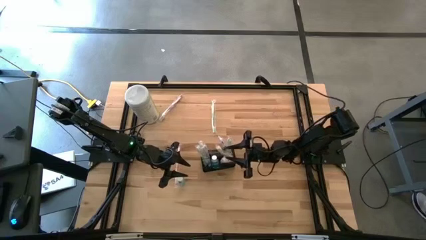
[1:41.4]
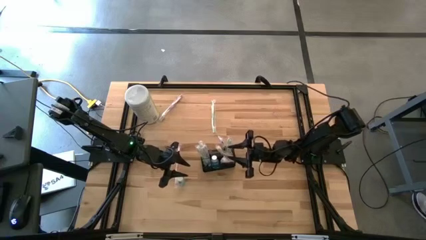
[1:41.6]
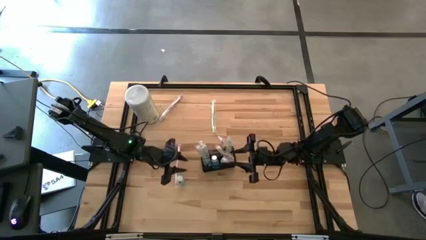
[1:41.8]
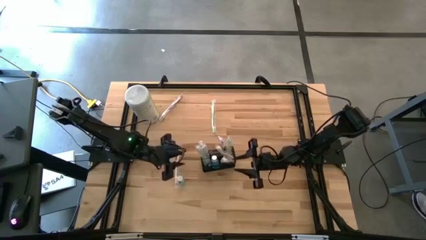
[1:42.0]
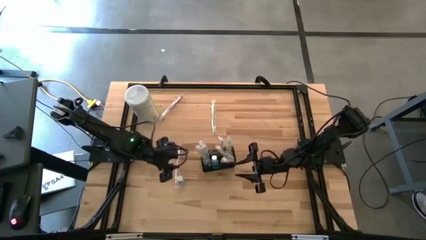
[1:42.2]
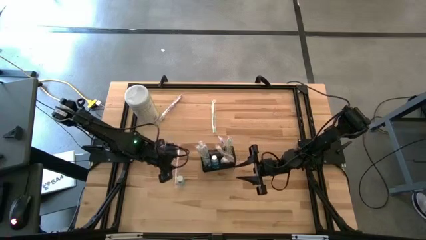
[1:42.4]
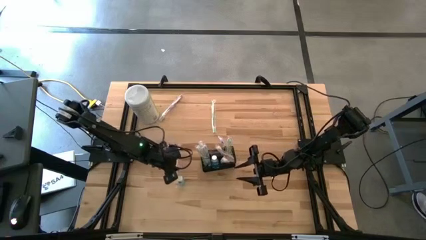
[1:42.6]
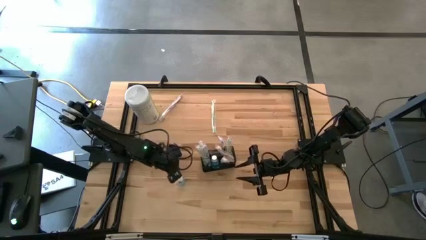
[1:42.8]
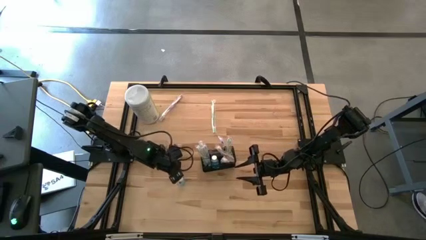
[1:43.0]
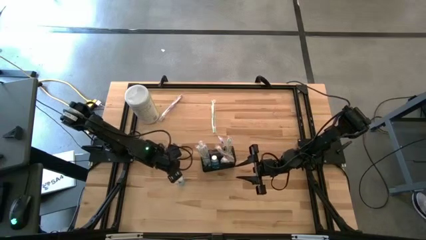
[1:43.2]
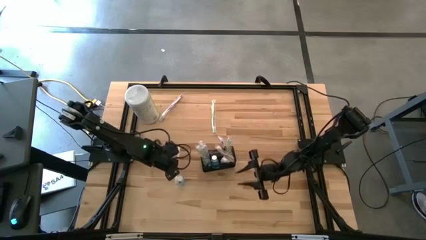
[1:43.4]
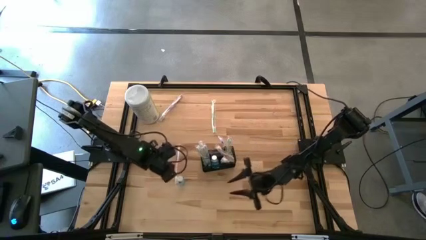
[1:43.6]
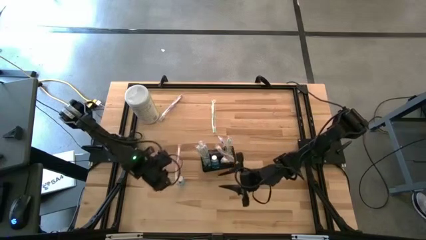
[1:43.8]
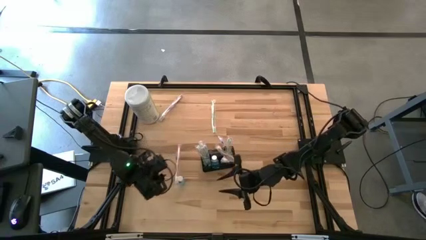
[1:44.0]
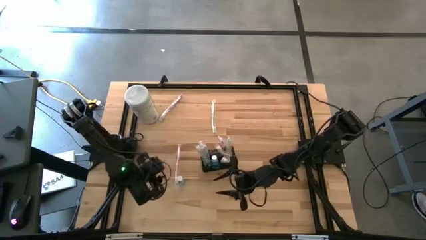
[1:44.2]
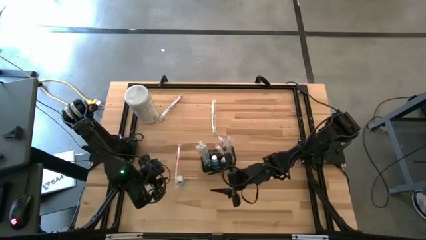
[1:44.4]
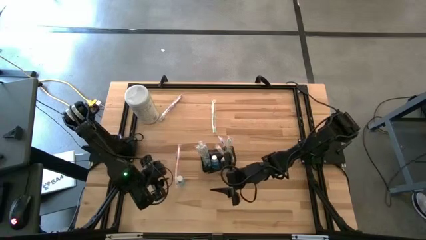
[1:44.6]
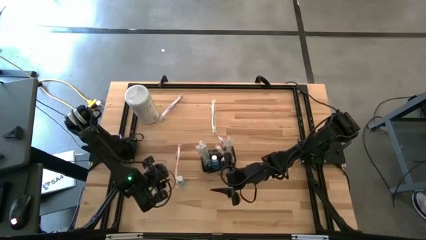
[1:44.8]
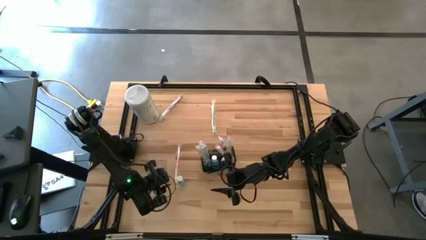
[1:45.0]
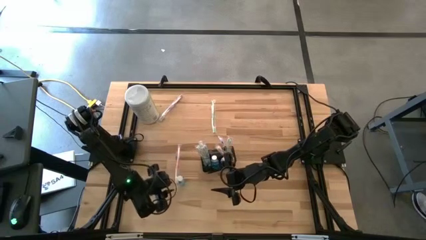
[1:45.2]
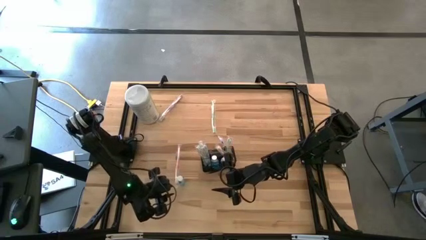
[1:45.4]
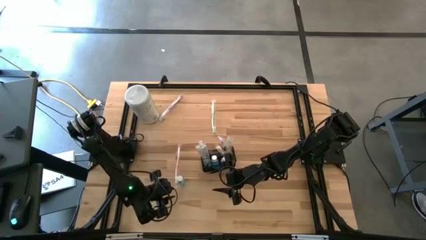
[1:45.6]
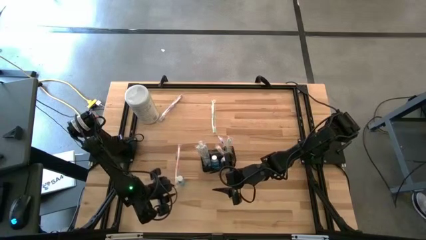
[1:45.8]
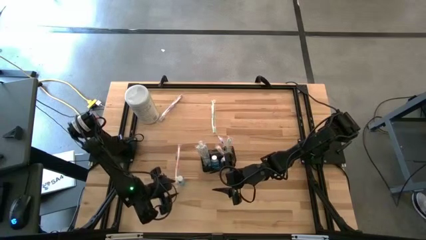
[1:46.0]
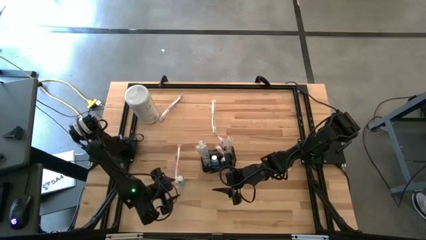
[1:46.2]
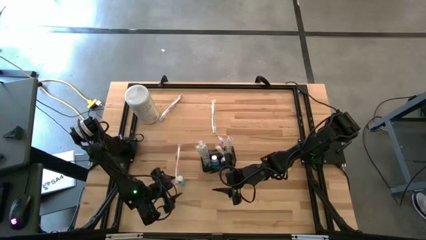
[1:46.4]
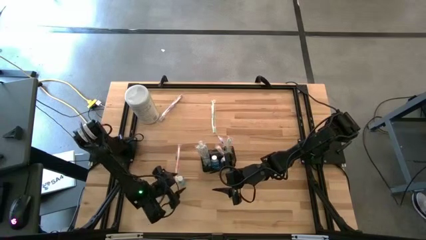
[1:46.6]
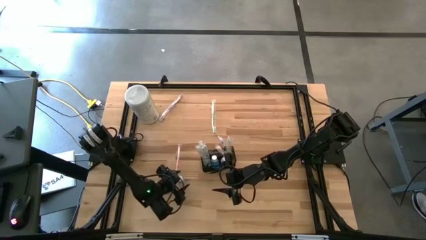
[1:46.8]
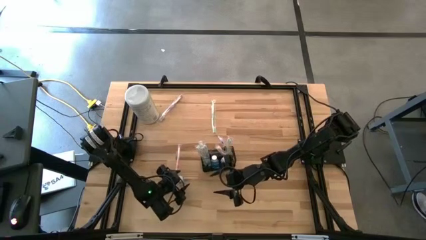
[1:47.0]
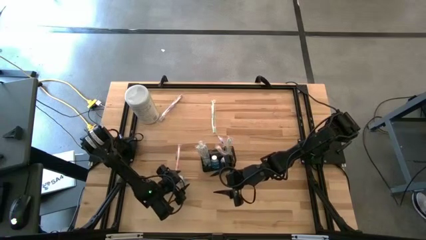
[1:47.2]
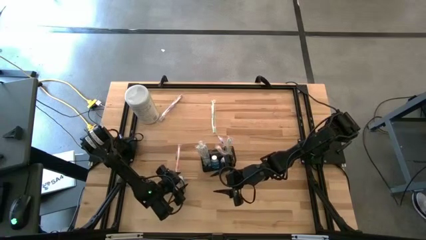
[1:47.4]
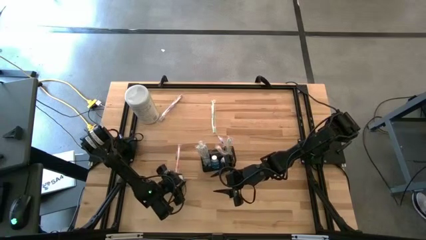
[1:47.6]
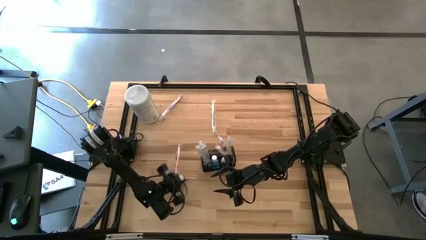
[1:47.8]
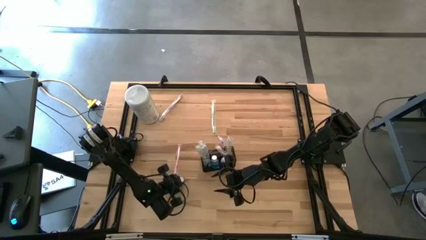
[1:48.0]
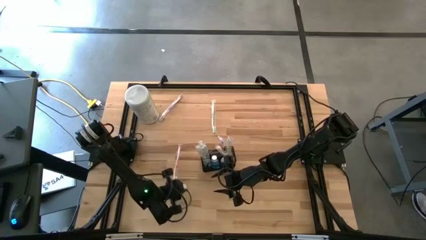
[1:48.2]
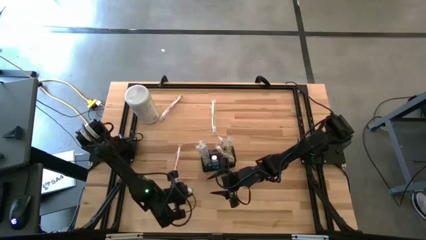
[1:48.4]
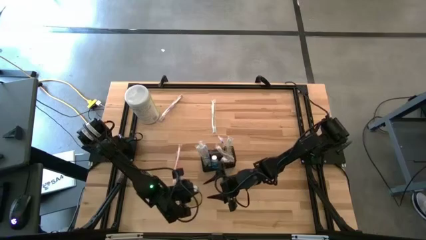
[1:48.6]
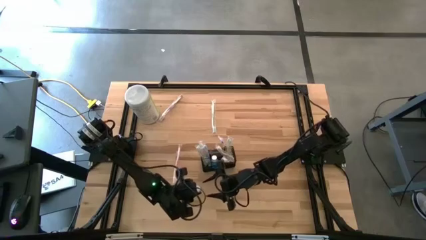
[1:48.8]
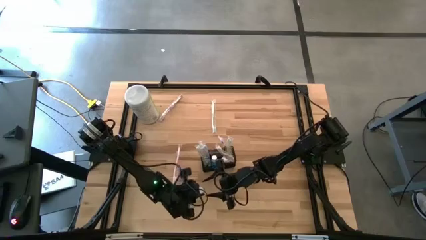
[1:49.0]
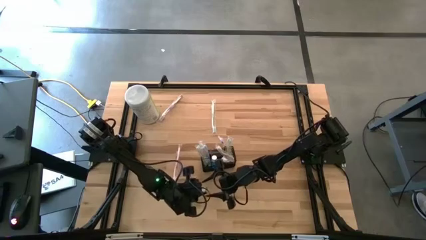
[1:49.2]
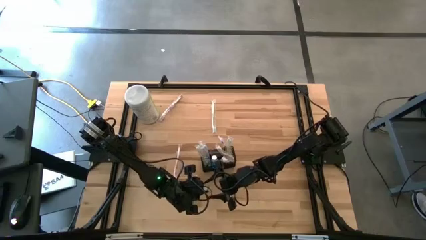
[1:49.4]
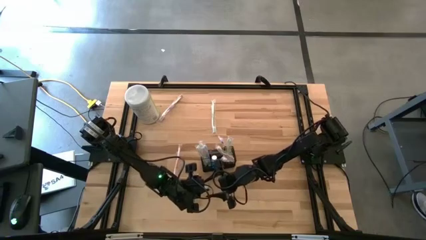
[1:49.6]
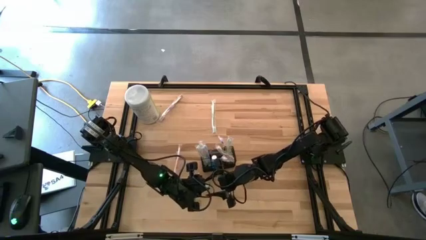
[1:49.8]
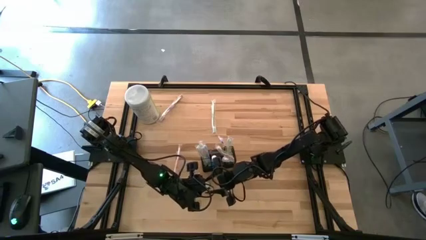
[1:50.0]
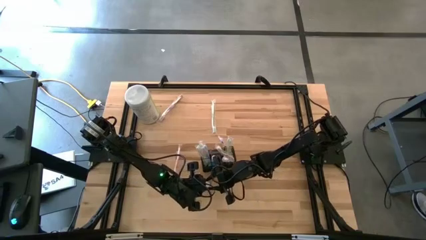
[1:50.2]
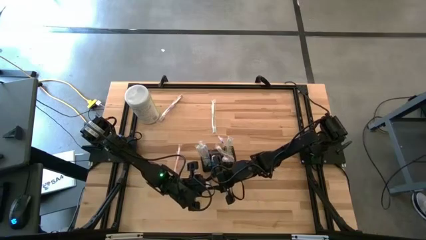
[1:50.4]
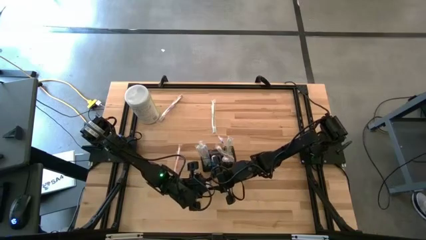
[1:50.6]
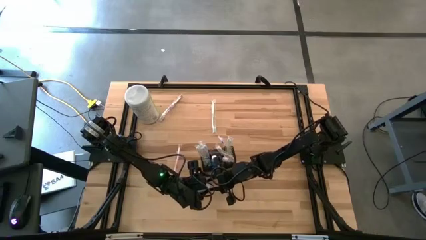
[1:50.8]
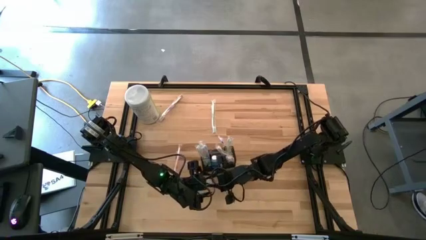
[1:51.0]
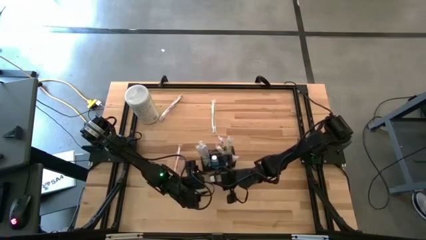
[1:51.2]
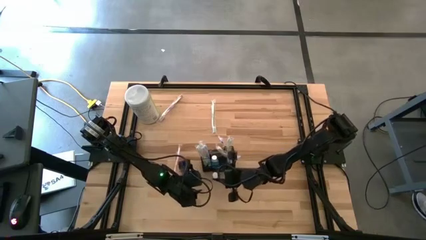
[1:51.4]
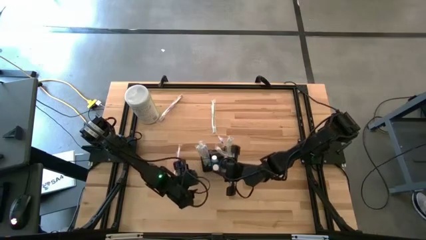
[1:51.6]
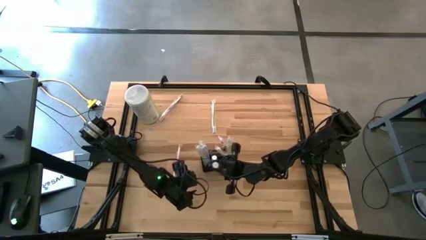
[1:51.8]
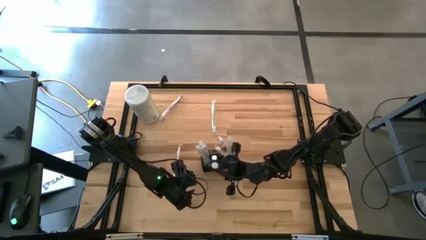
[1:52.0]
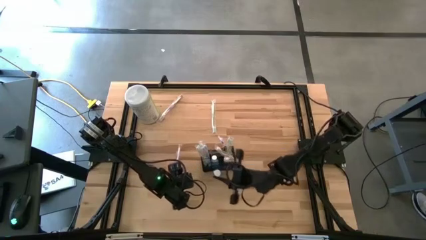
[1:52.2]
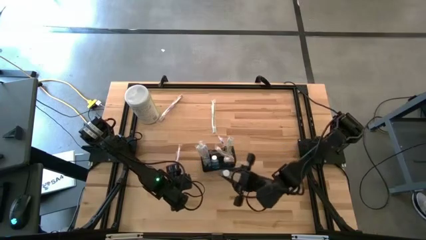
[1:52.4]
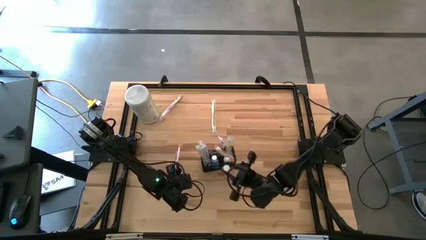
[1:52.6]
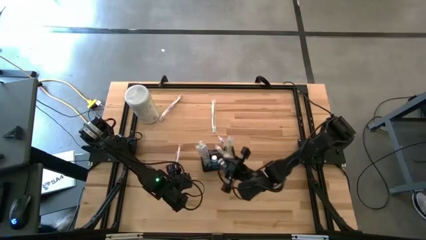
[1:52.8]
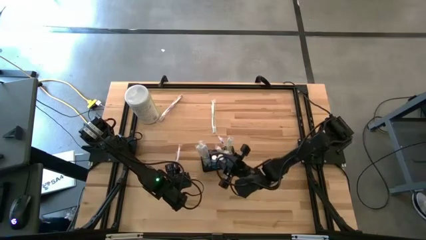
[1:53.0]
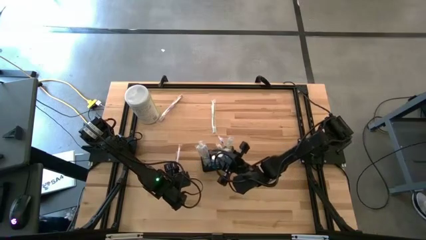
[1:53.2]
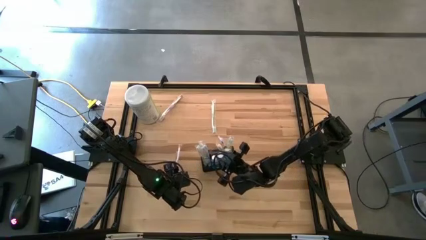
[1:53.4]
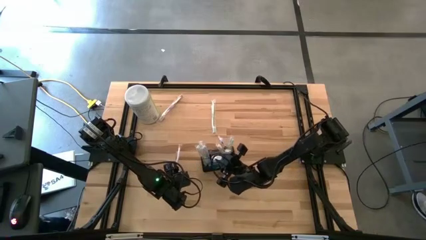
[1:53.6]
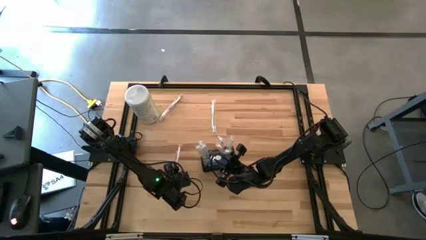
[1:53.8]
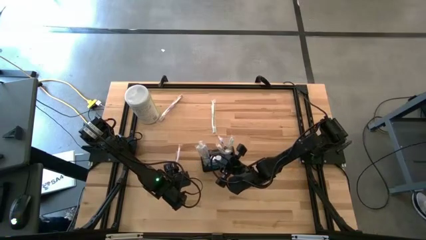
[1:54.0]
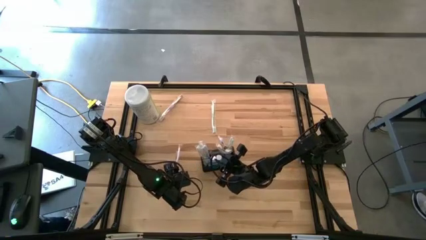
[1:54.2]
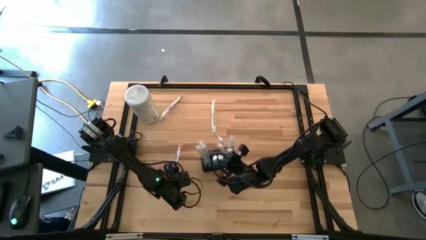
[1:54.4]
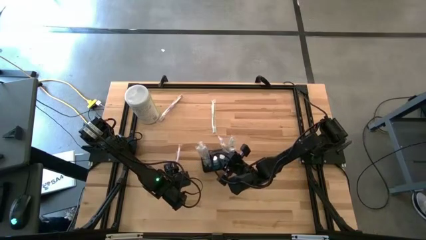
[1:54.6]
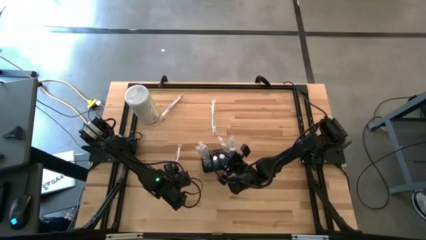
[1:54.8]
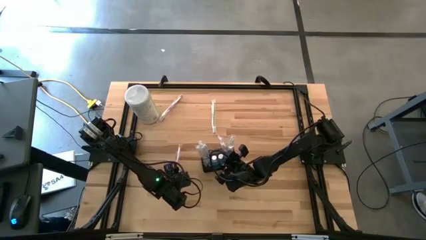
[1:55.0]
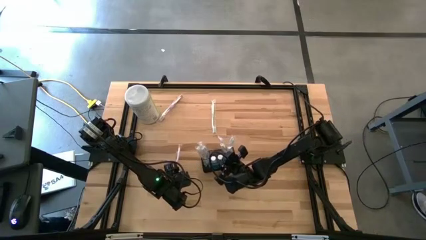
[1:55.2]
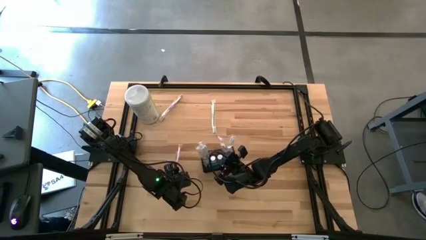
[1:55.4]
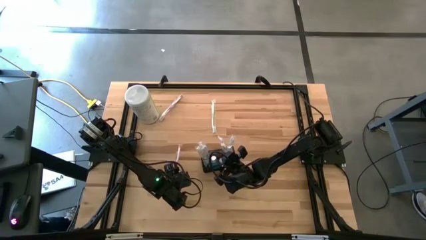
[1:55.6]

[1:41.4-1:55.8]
Task: Pick & Place toothbrushing station
Put the blue mouthwash into the black wire organizer
